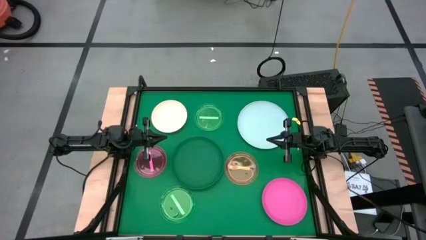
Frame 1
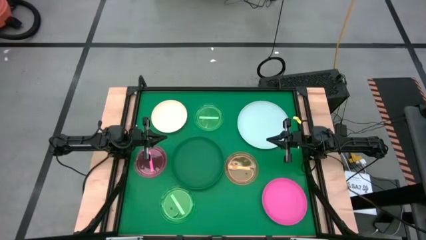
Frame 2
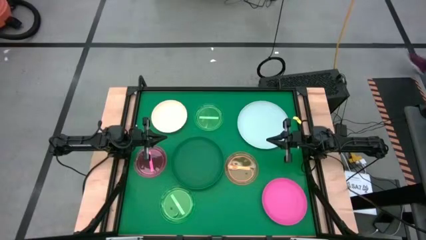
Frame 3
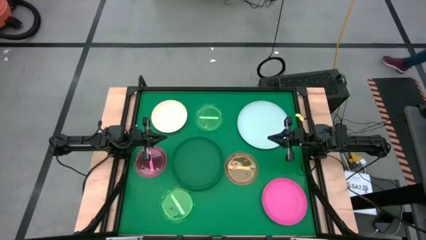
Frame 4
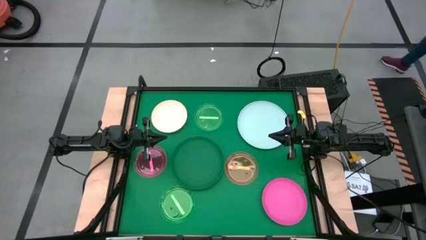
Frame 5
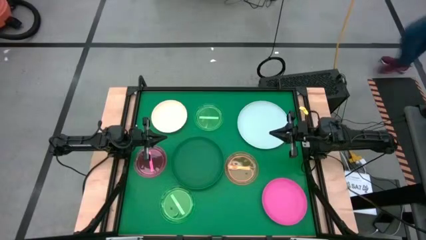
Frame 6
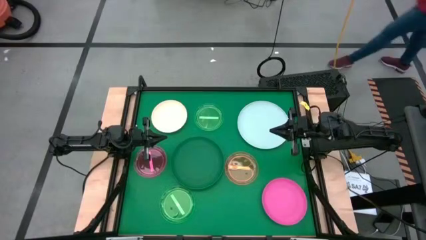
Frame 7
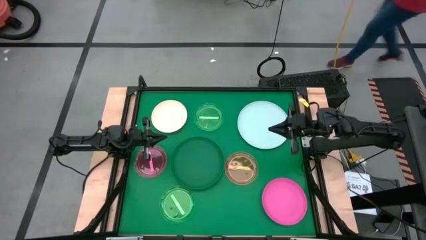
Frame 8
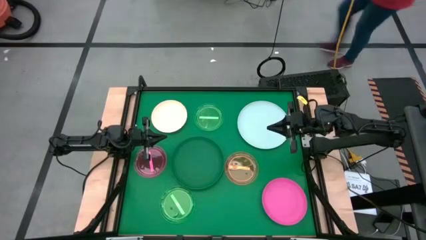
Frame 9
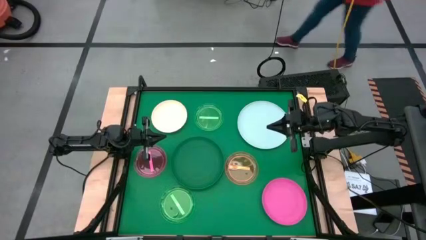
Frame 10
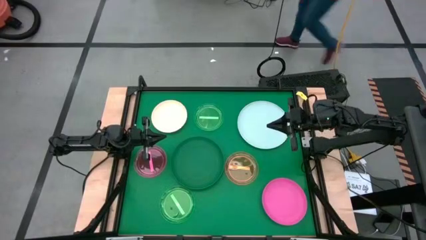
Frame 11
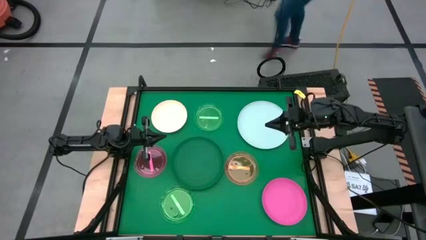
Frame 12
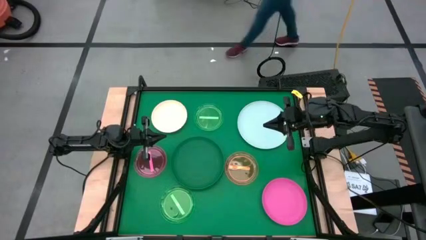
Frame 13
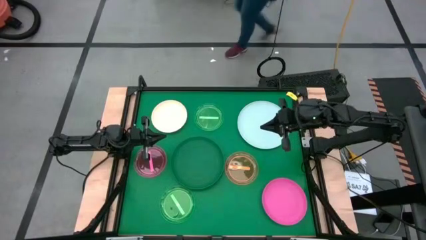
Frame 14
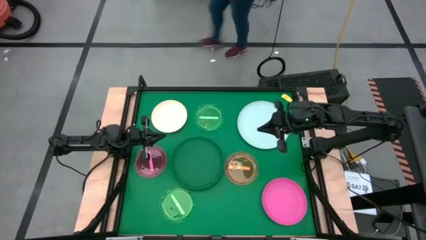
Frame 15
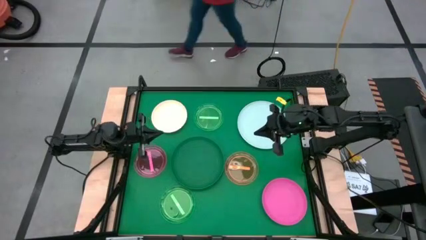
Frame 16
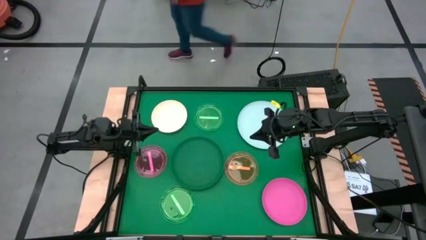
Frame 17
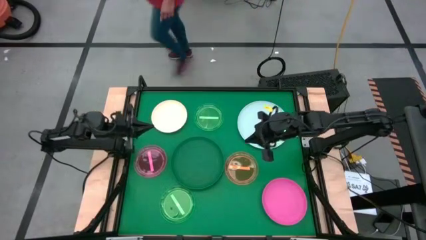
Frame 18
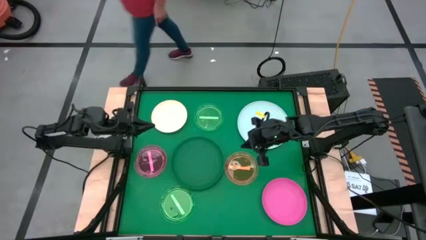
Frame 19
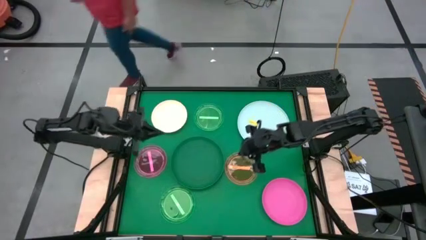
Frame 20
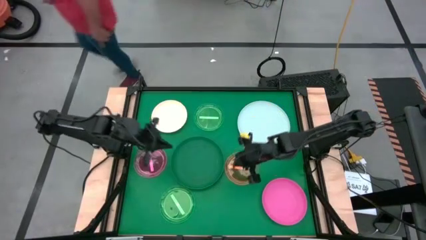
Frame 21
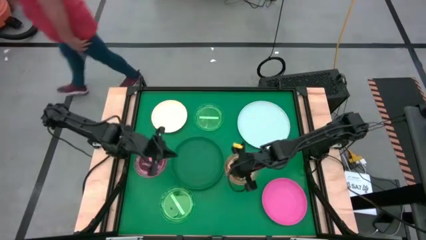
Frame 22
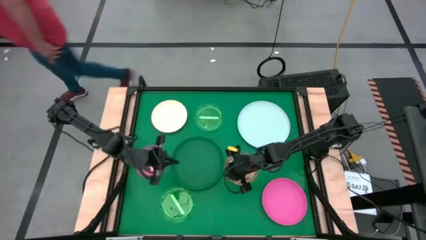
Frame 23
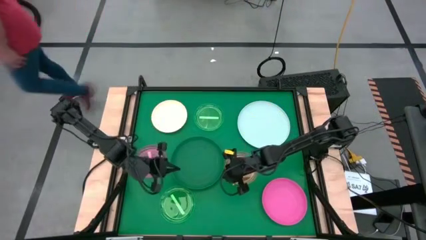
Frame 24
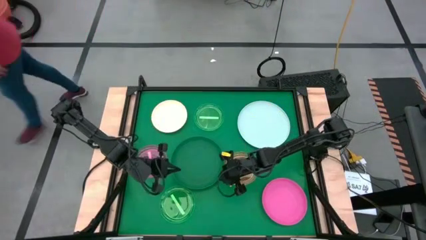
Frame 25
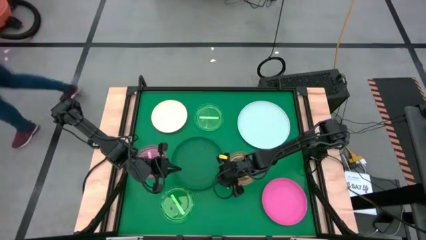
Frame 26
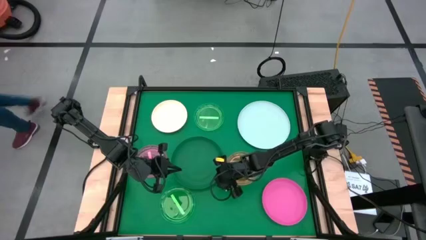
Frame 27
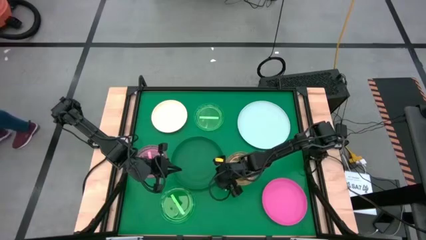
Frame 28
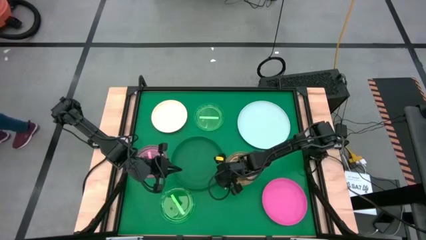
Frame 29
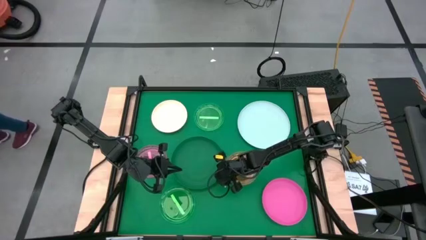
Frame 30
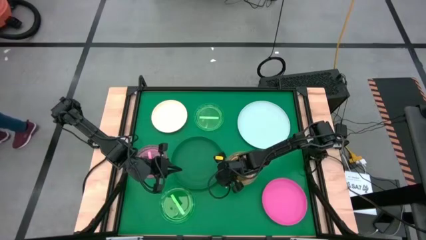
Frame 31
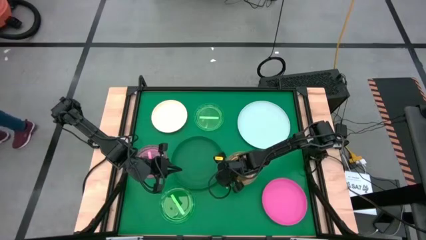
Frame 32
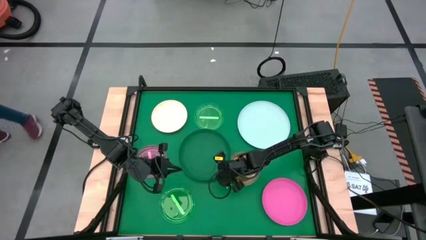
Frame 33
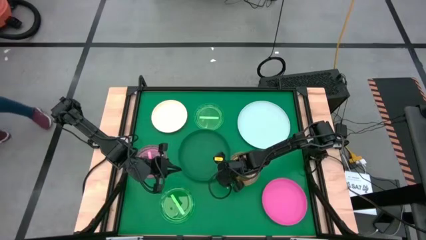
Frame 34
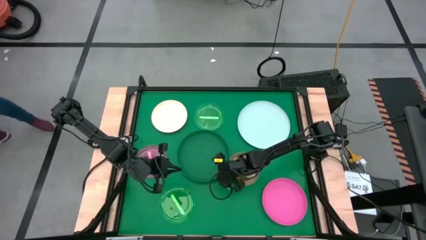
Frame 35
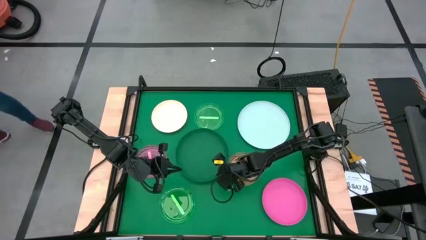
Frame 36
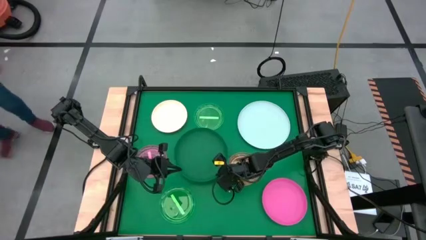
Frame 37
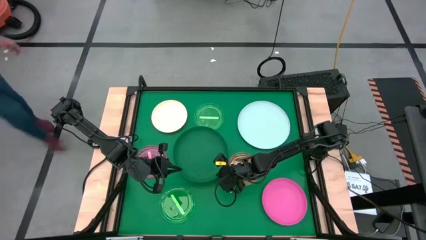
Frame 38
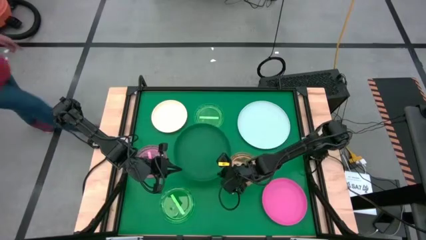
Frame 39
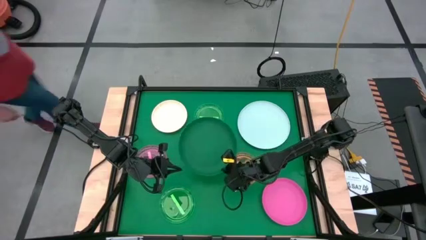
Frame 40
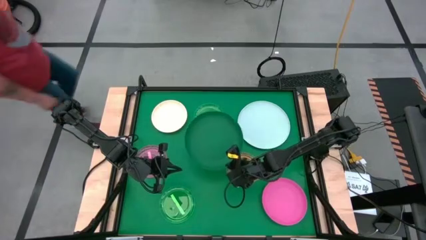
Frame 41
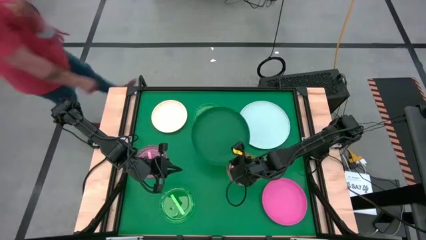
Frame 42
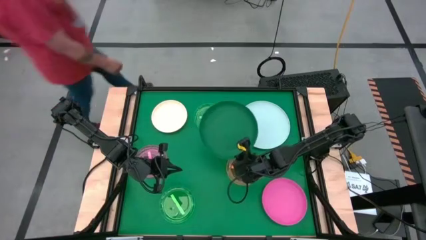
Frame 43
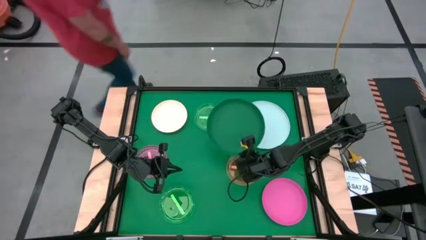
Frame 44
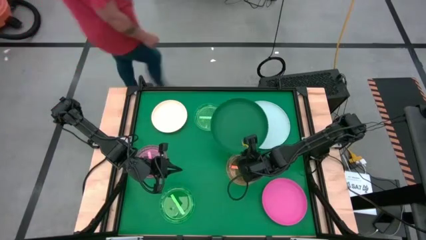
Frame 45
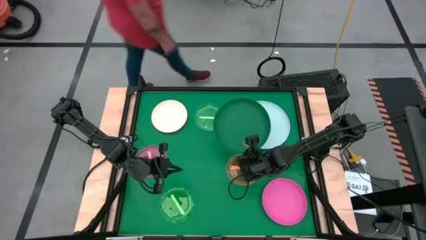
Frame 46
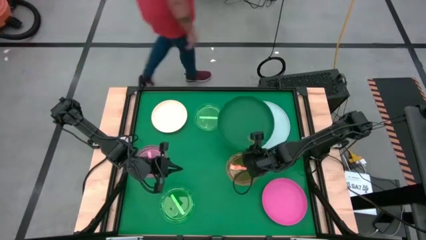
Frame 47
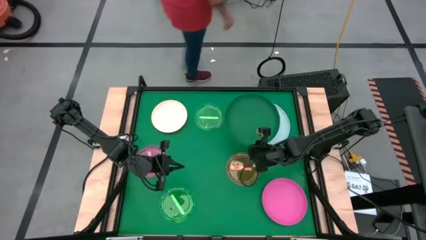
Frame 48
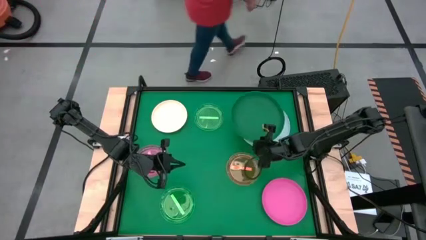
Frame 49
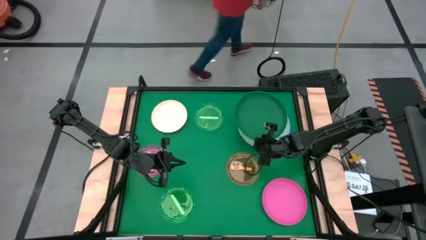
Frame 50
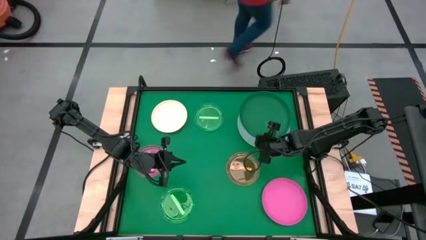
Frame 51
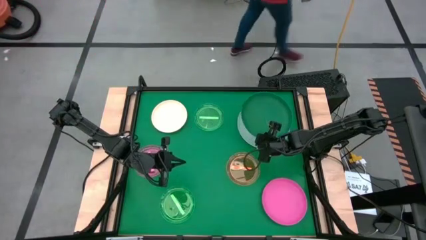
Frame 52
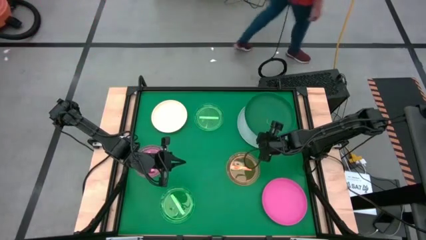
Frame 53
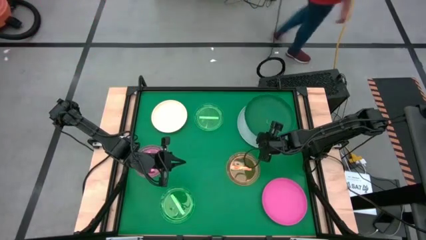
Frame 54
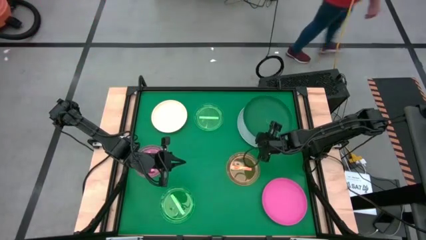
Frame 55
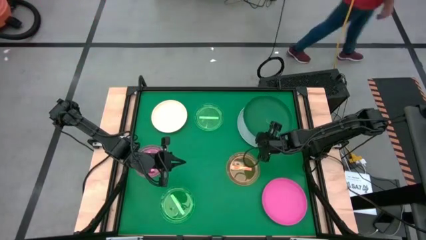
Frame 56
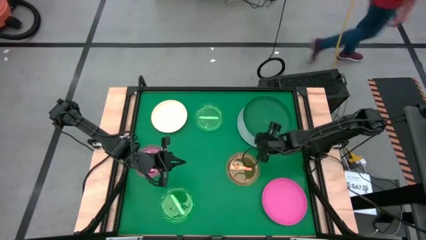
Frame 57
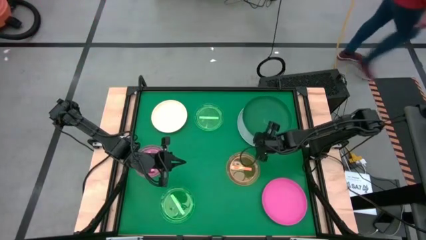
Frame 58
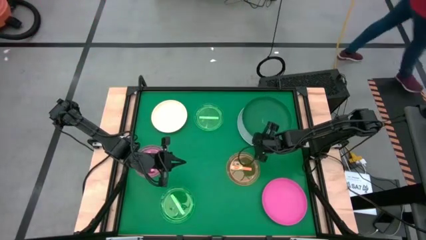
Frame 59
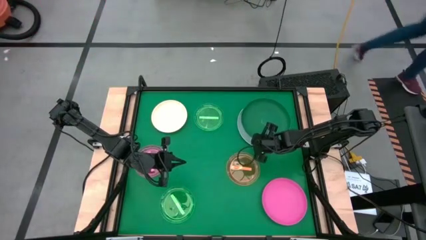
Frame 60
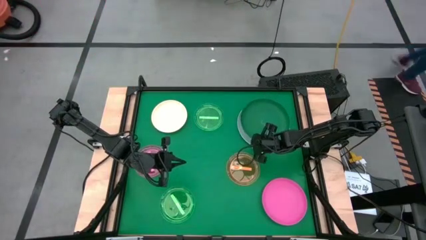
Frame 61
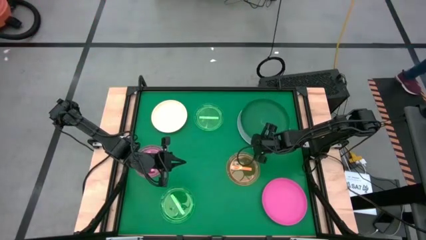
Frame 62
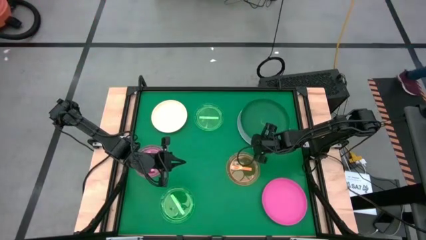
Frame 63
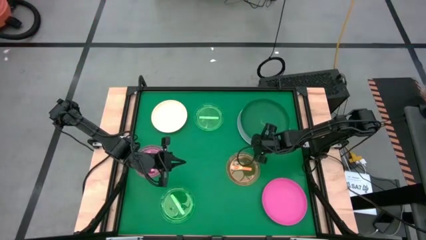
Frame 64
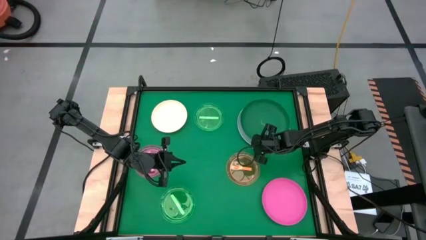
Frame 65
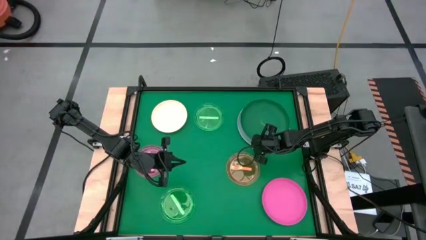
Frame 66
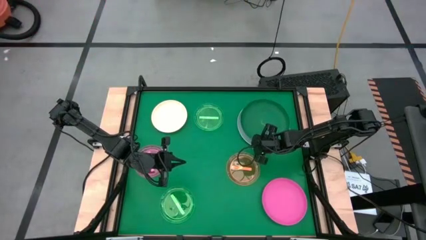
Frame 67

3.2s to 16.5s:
Task: Stack plastic plates
Stack the green plate on the blue plate
